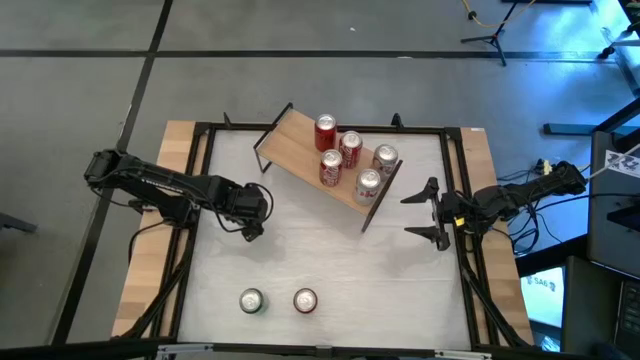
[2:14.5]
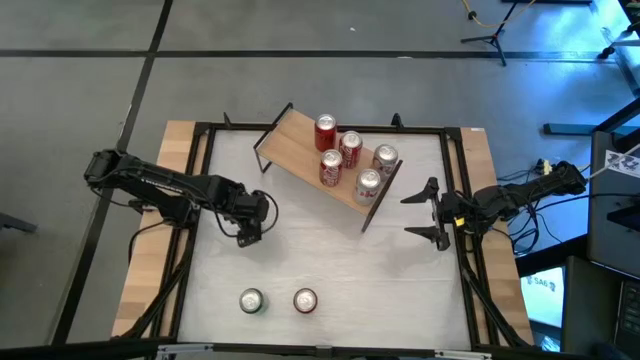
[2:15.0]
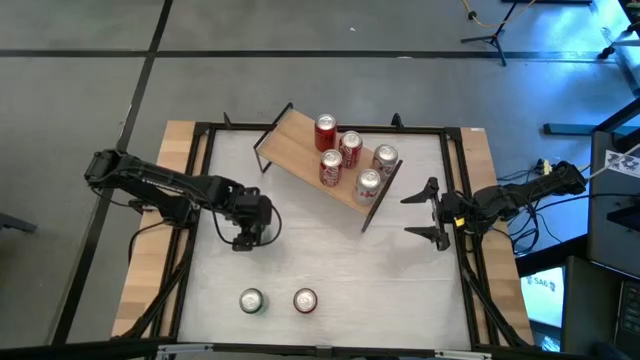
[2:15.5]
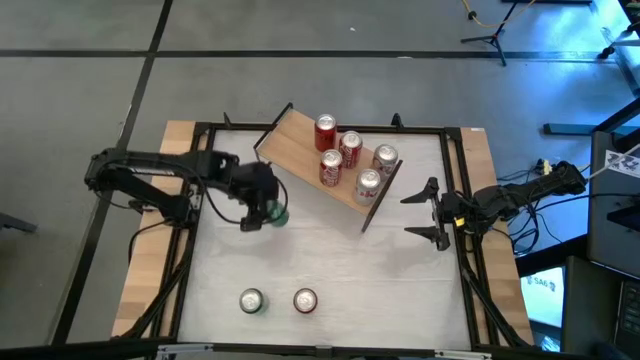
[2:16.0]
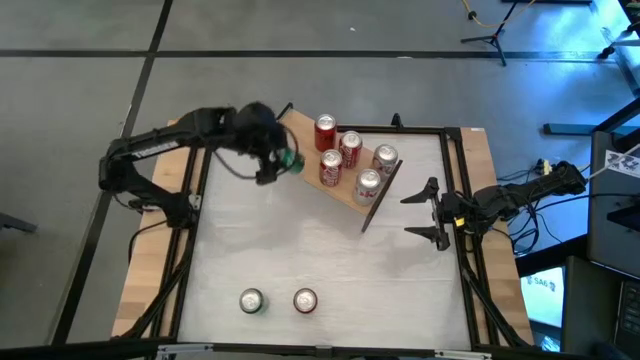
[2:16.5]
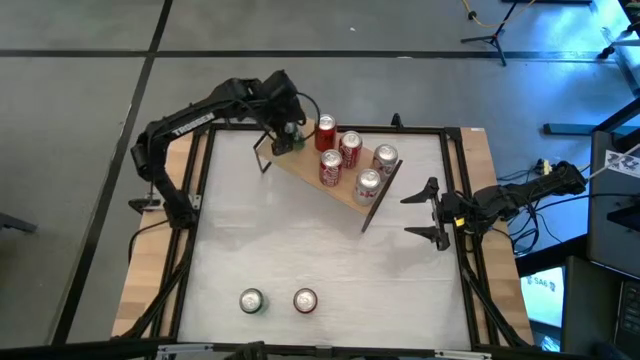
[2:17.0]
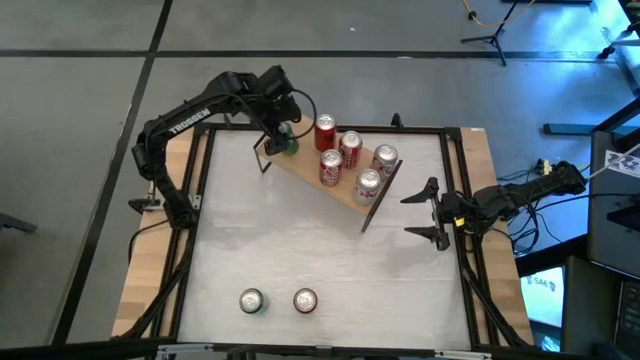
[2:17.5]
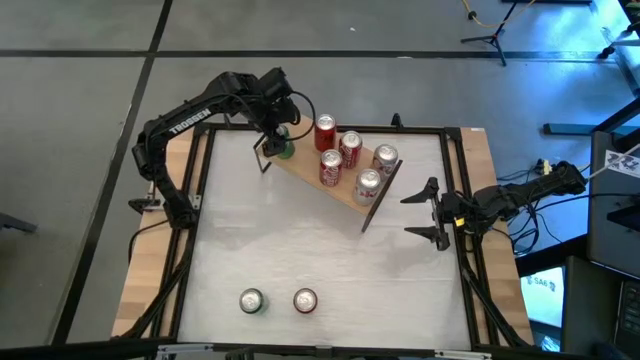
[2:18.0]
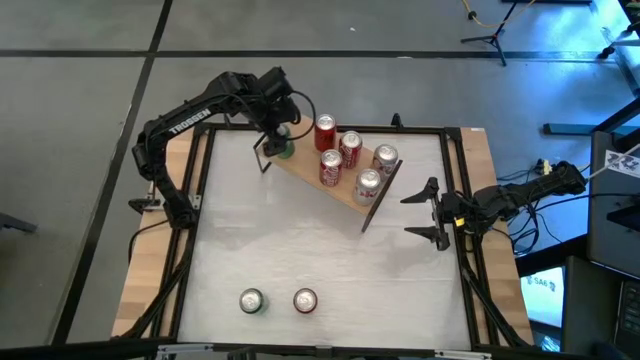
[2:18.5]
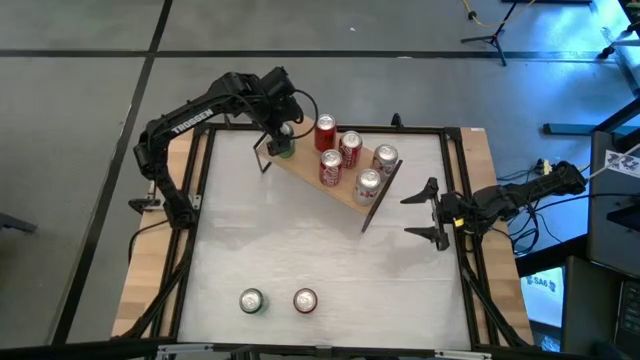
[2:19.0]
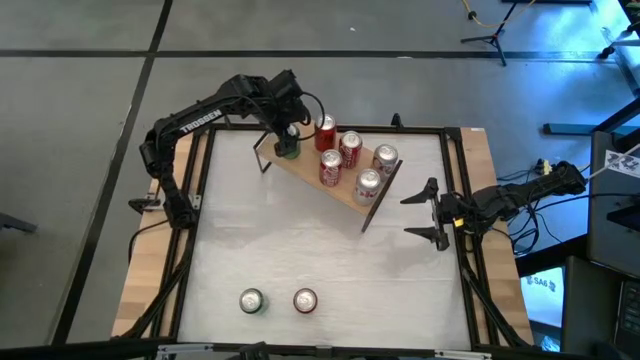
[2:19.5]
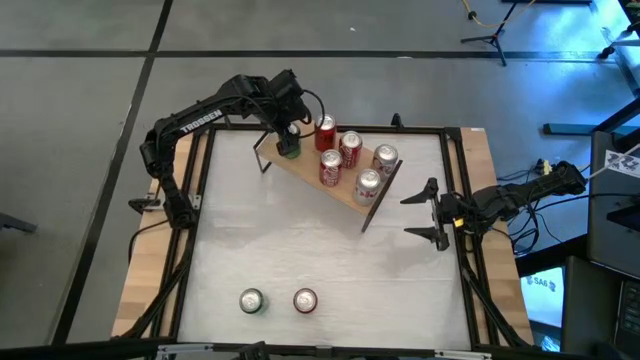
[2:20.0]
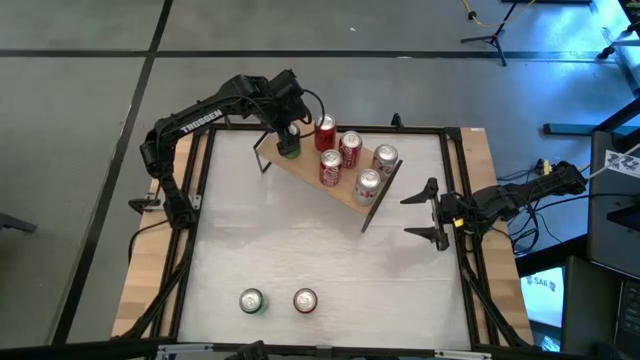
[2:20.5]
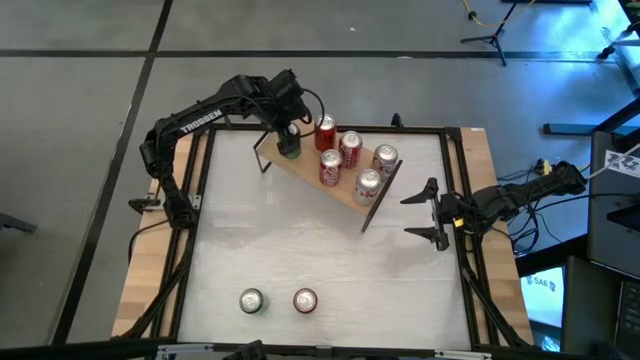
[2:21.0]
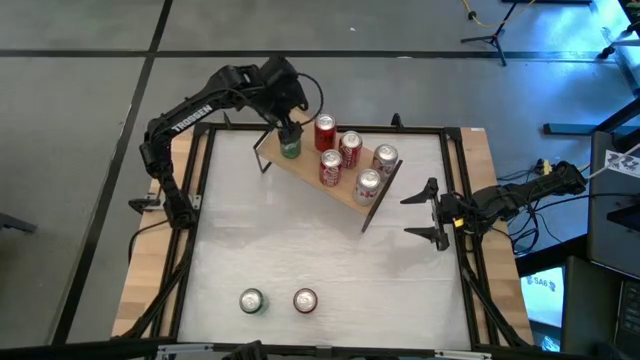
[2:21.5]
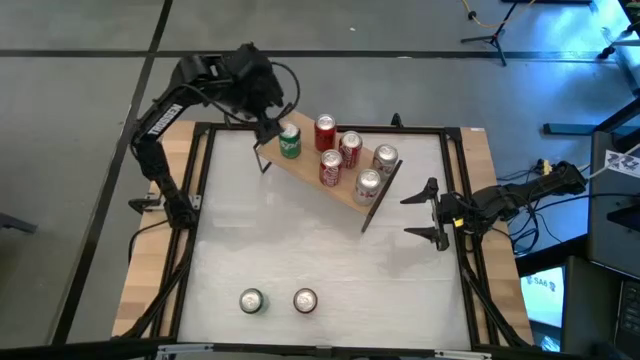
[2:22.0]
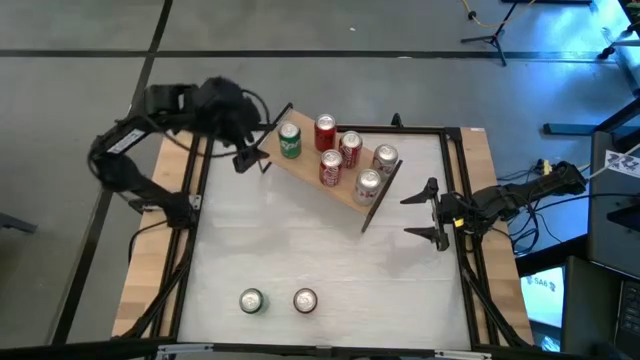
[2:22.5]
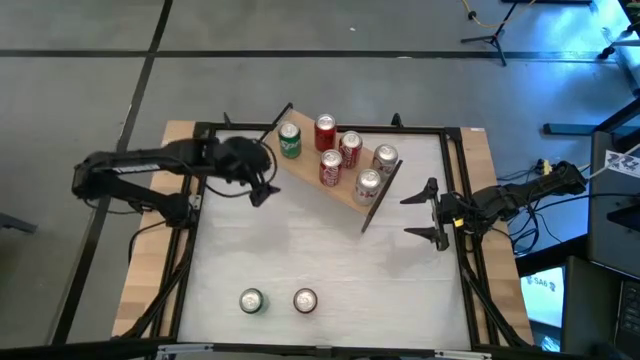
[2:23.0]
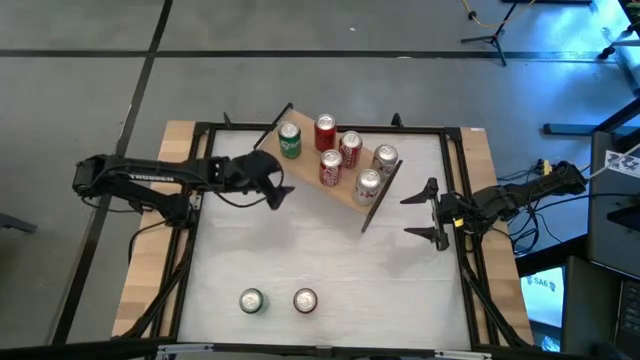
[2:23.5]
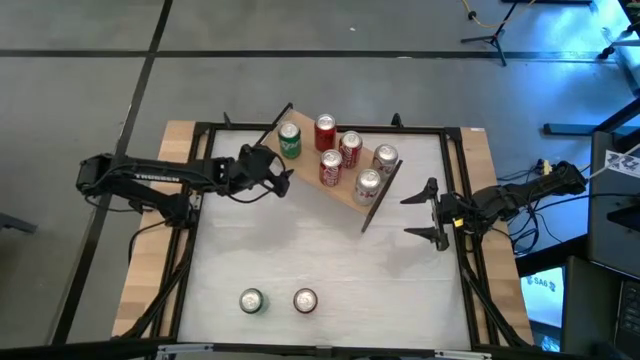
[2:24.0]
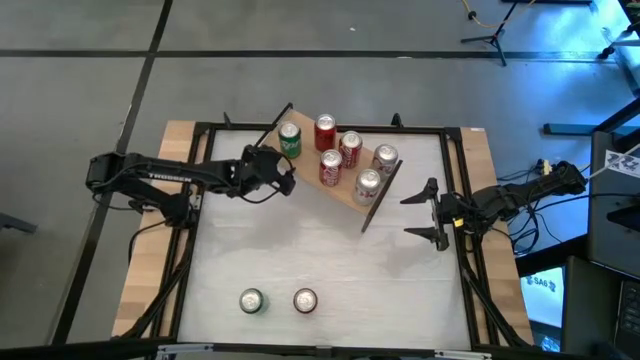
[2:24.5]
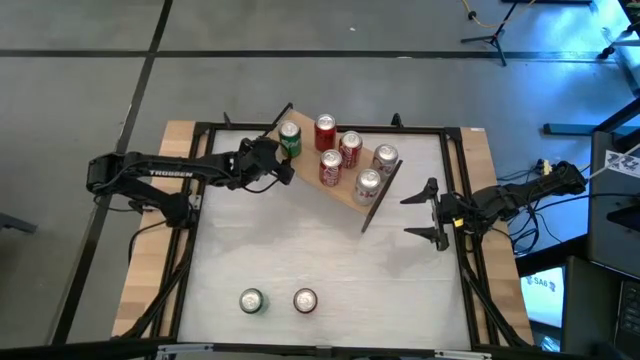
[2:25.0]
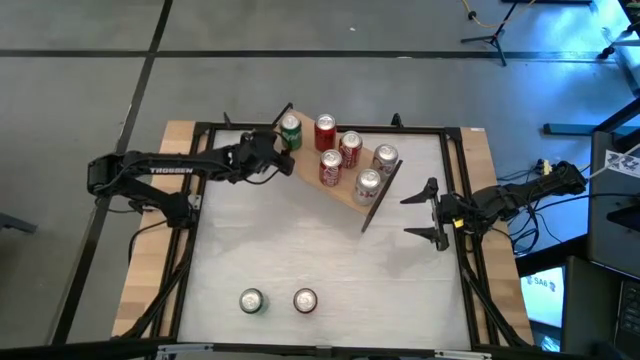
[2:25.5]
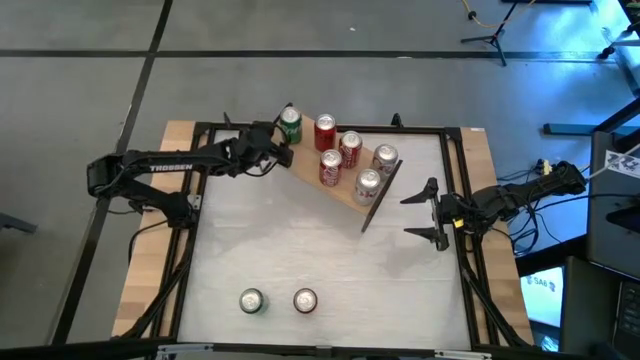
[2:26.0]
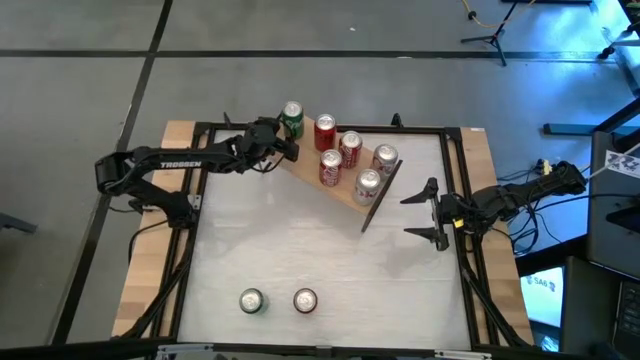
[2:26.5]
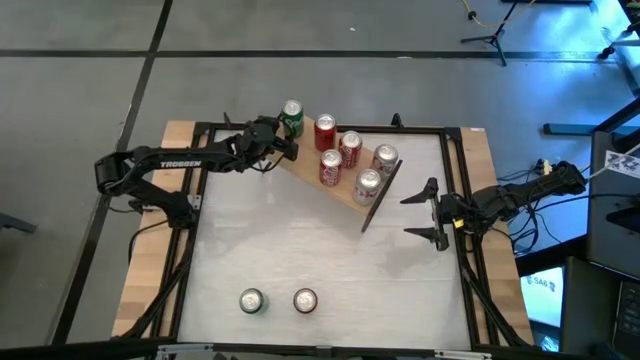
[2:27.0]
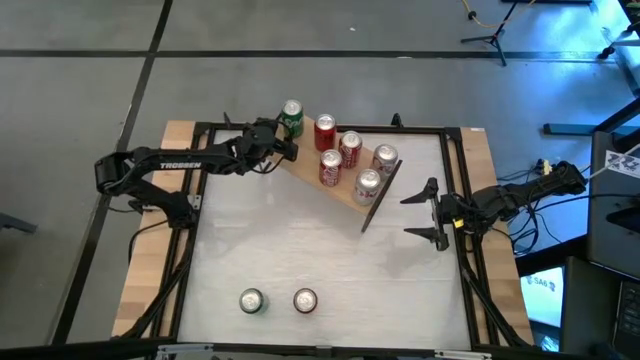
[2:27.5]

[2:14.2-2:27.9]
Task: Place canned beverage on shelf
Put the top green soda can on the shelf

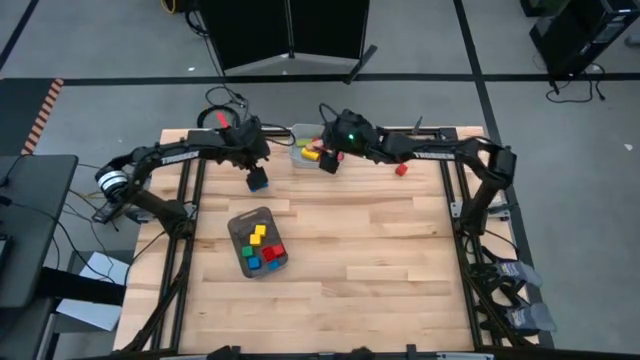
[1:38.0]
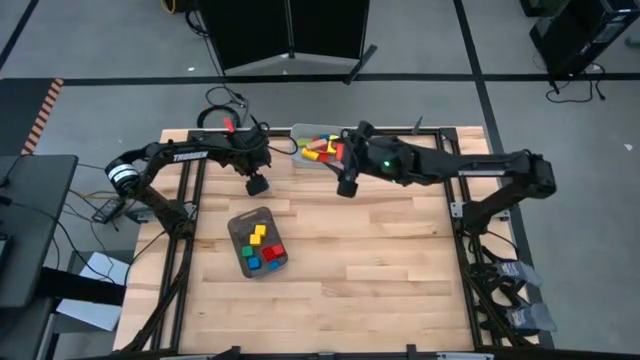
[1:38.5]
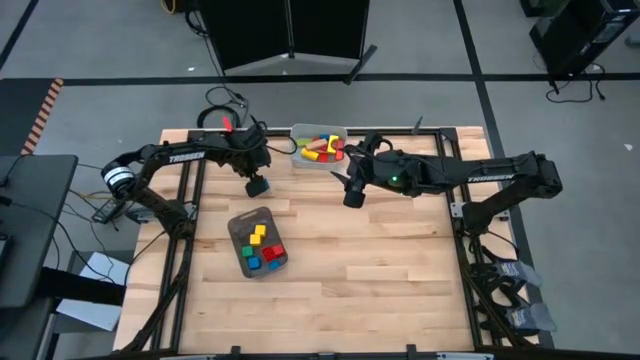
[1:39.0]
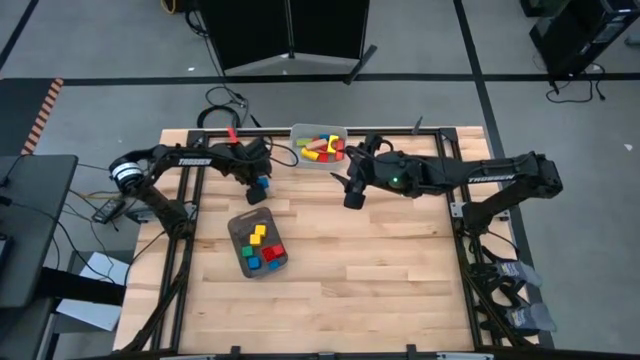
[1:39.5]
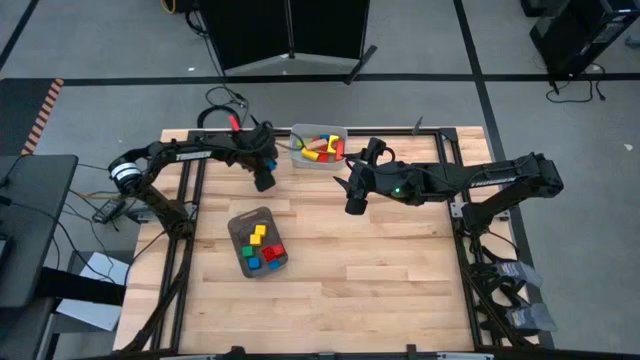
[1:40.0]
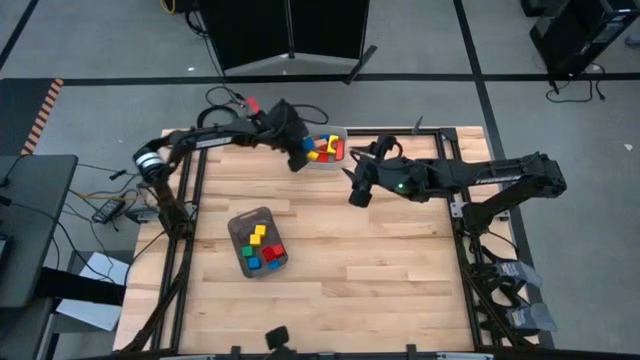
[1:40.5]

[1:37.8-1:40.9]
Task: Sort blocks by size
Put the blue rectangular block into the gray bin

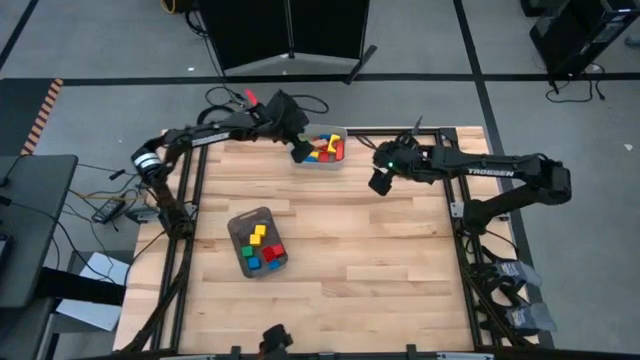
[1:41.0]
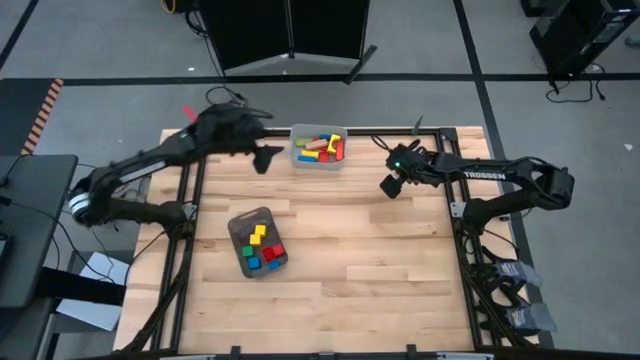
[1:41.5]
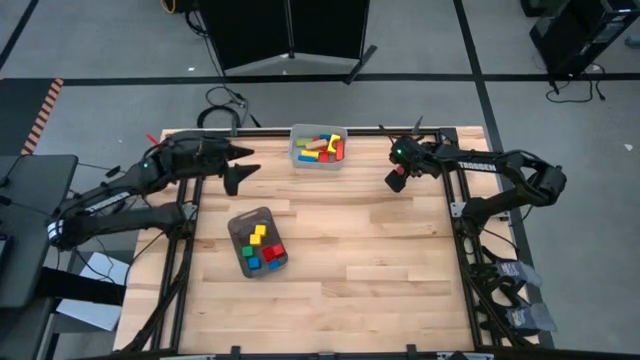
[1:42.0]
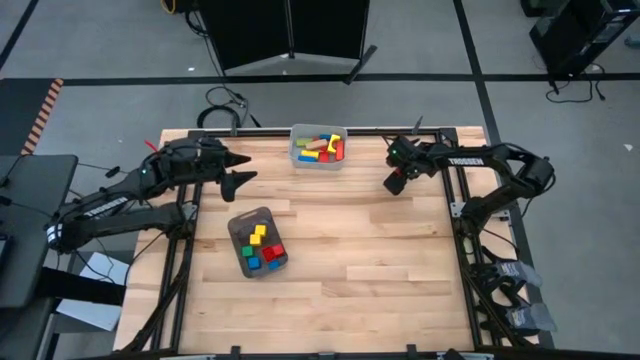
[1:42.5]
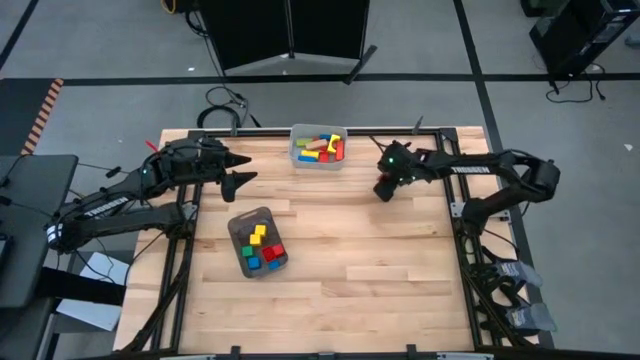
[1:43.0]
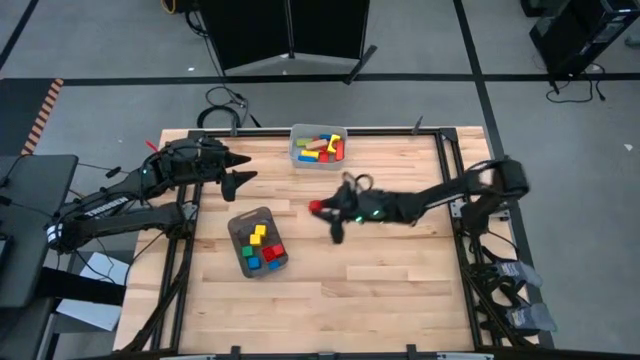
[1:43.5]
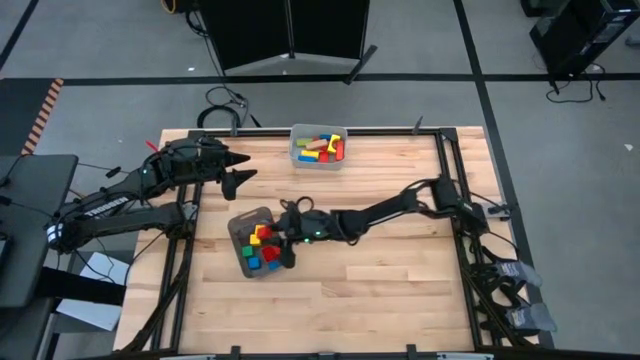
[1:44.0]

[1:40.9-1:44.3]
Put the red square block into the black bin

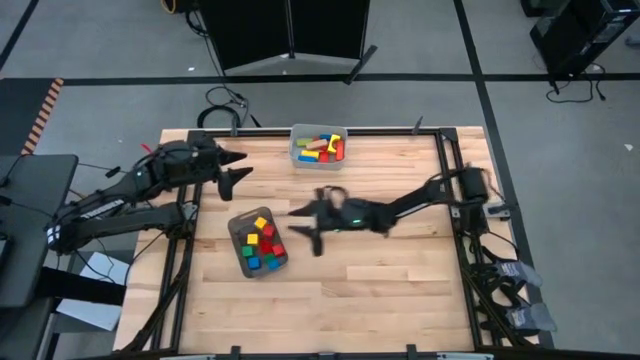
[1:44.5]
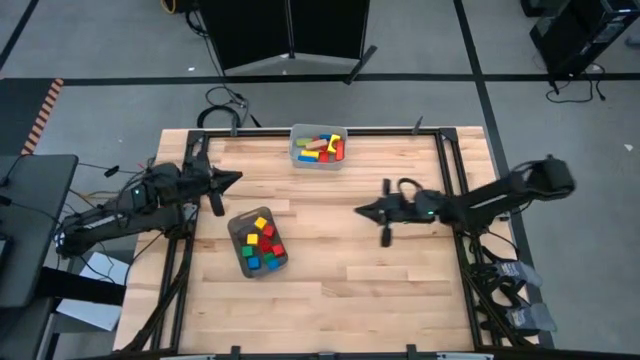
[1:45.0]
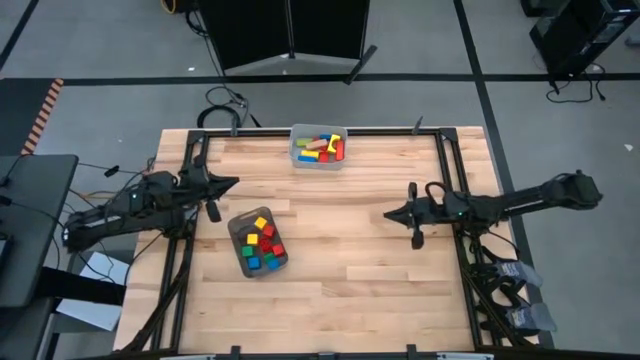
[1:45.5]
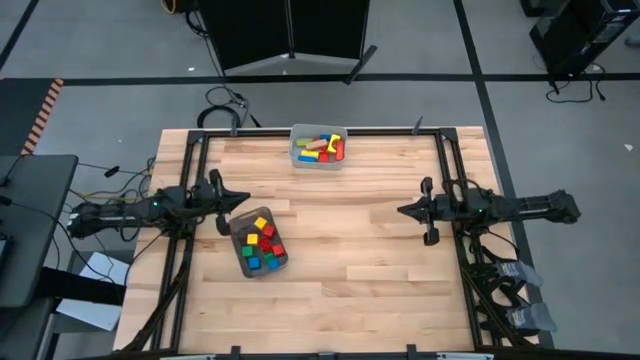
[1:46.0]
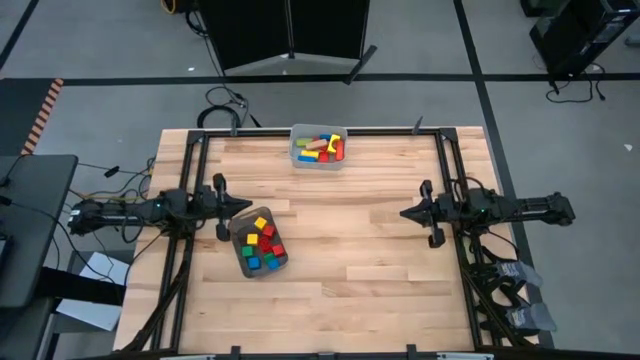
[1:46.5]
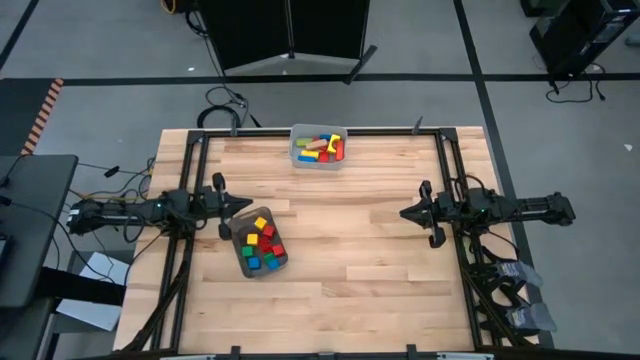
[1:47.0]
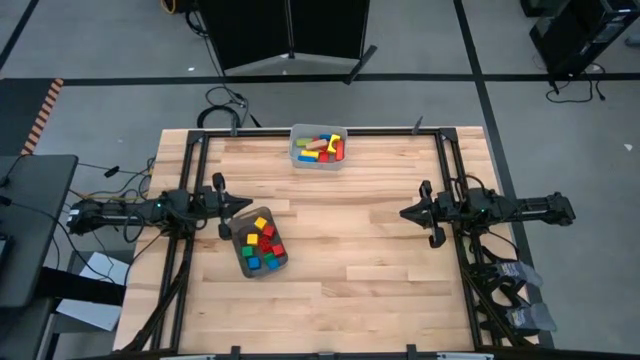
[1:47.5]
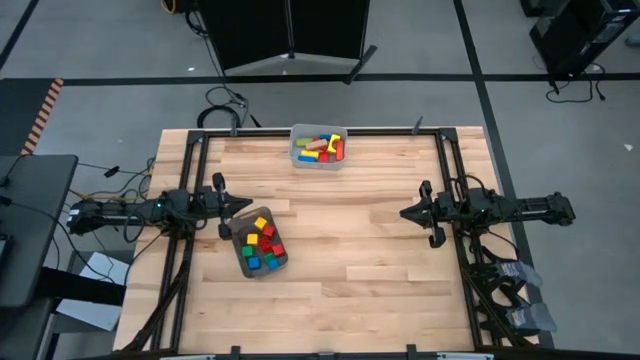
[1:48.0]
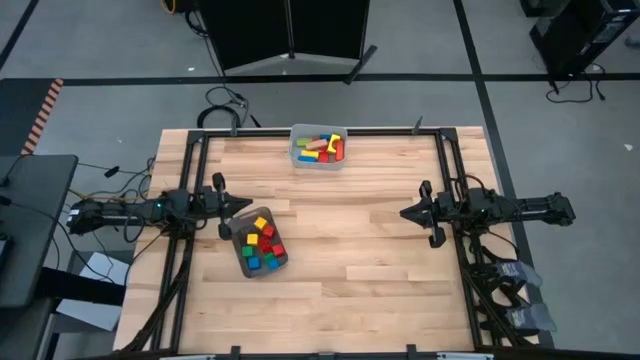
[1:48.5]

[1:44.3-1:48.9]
Return to Home Position
